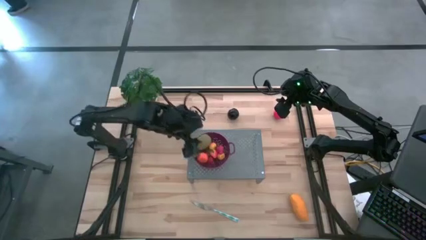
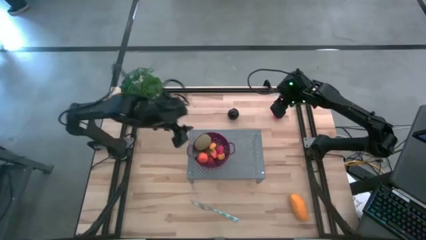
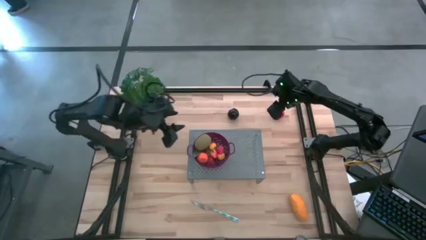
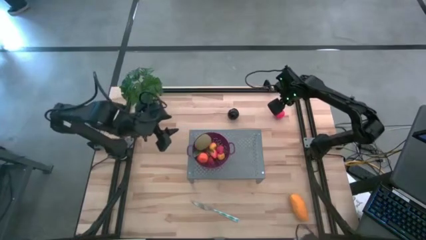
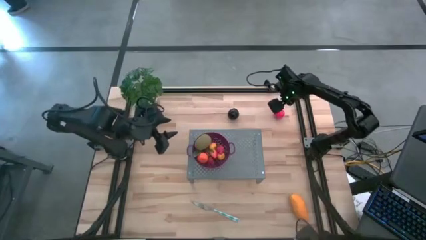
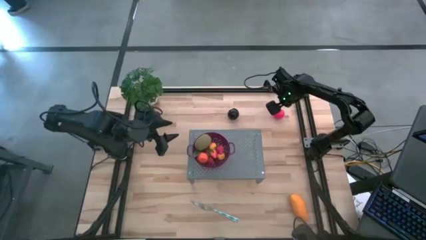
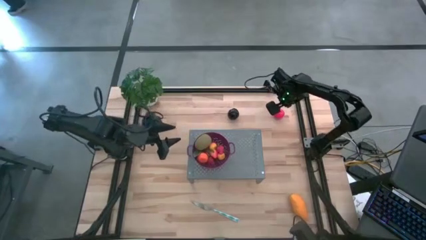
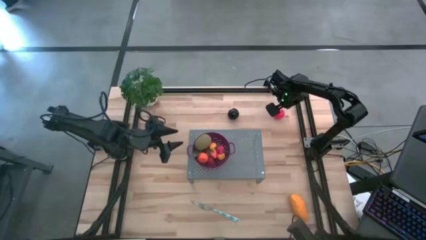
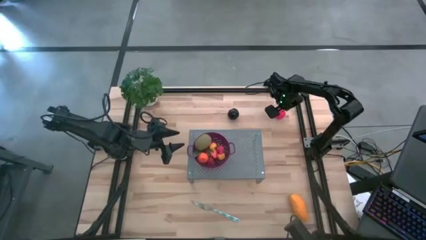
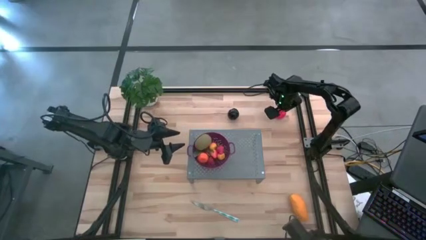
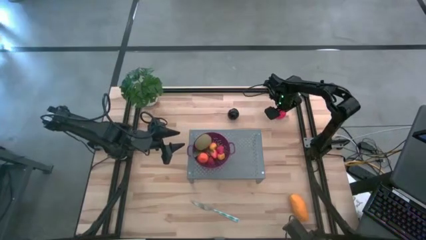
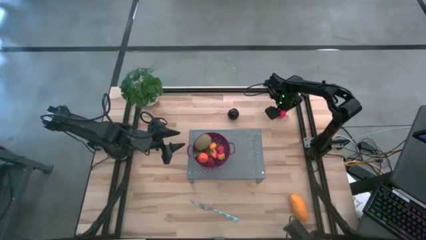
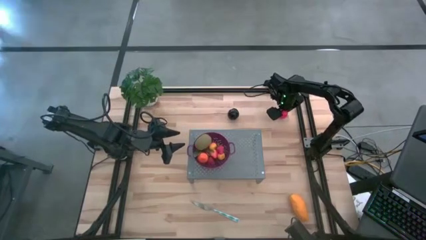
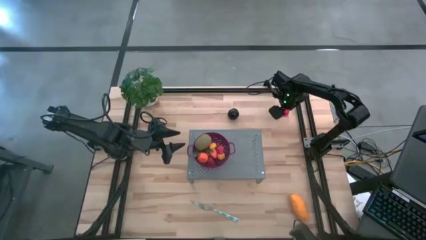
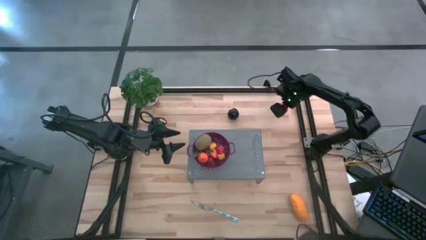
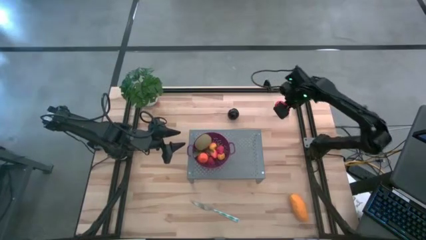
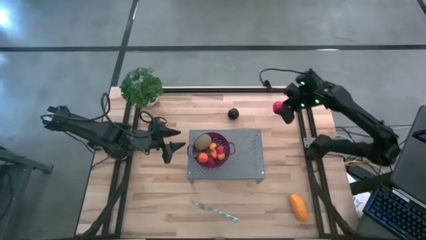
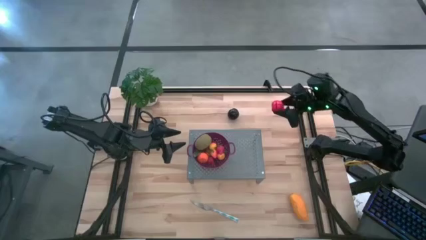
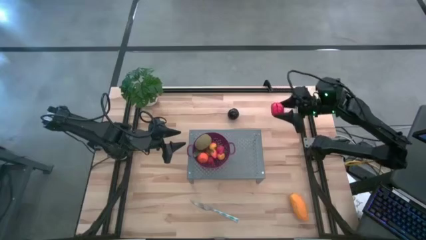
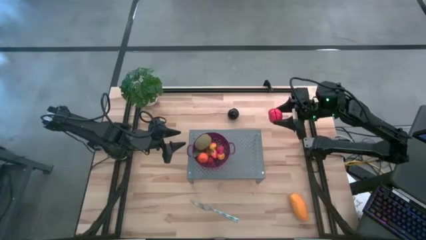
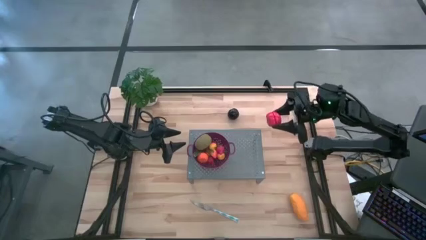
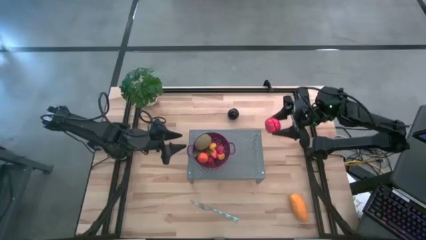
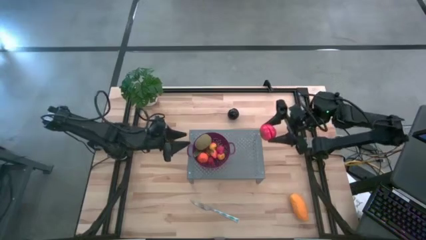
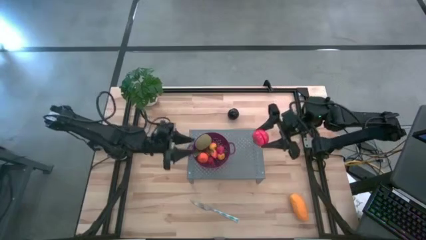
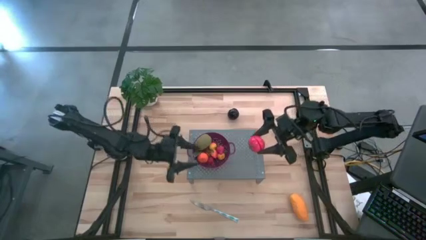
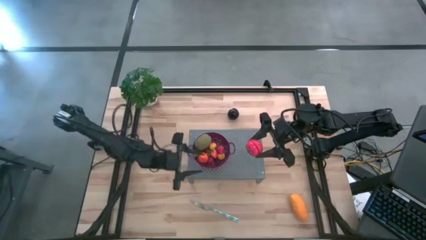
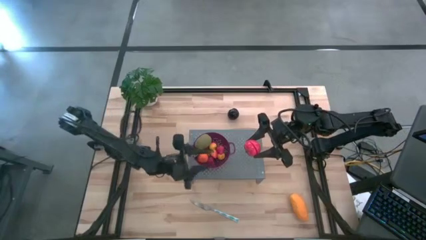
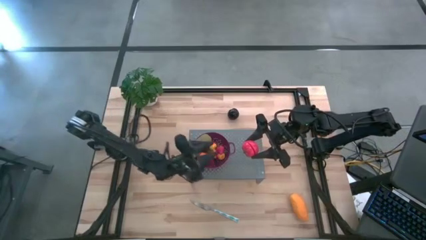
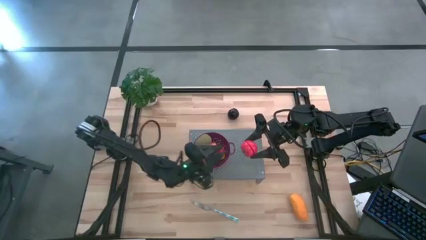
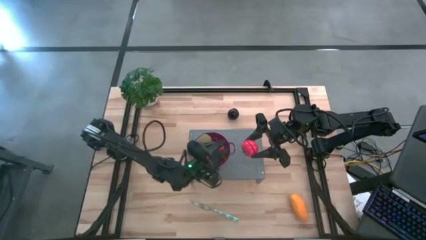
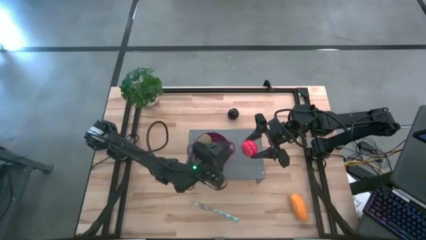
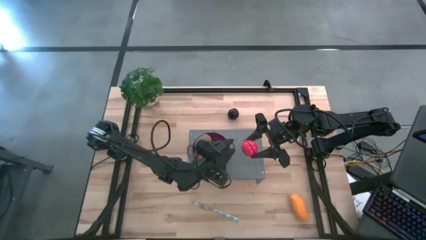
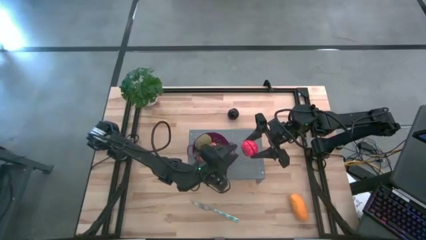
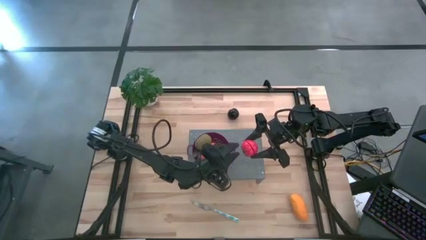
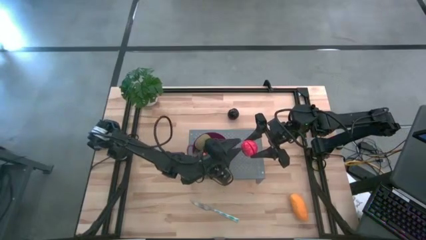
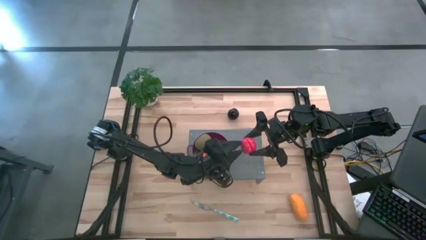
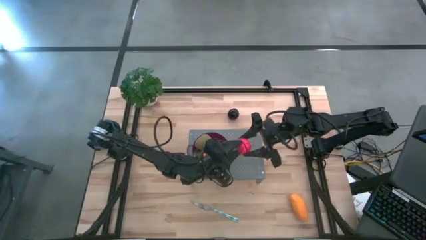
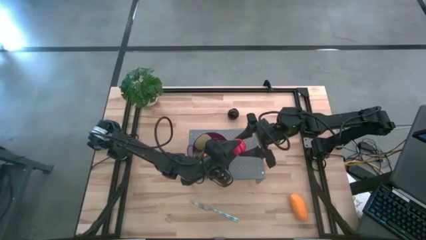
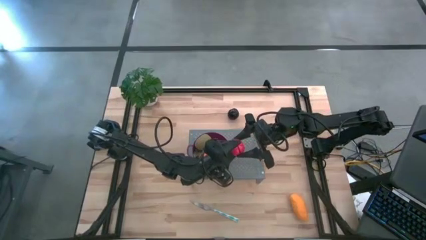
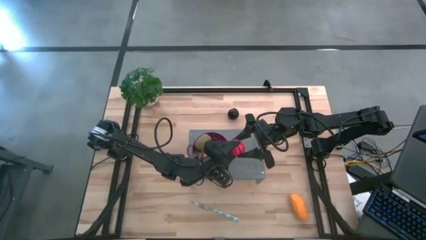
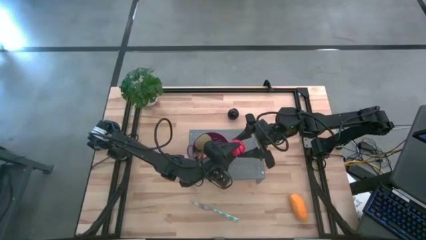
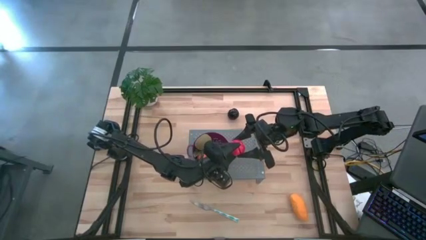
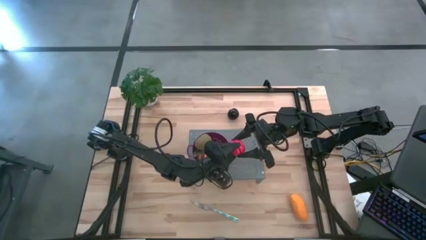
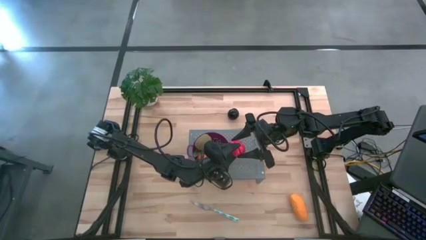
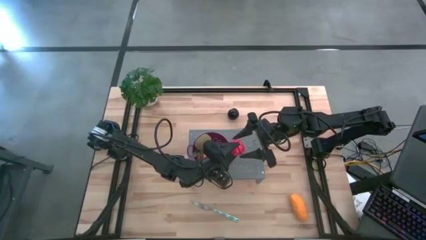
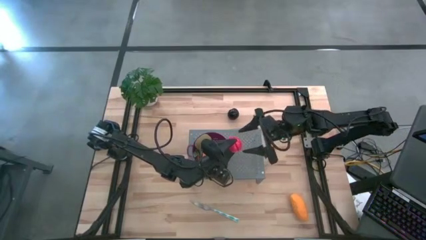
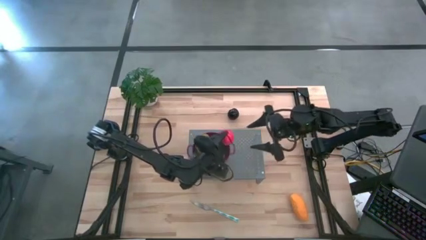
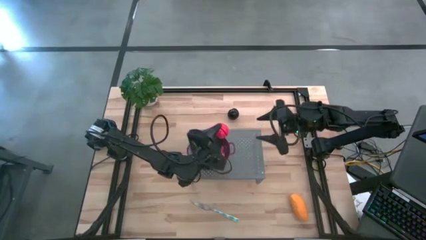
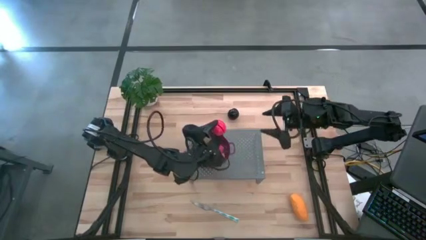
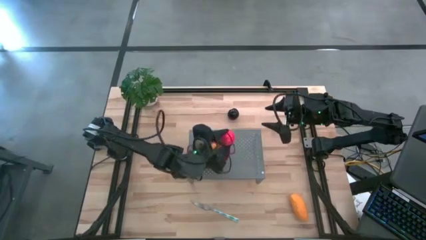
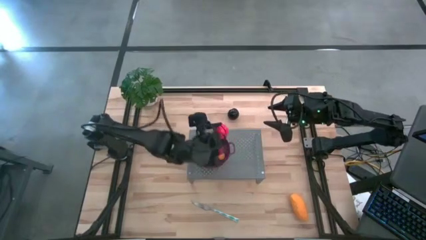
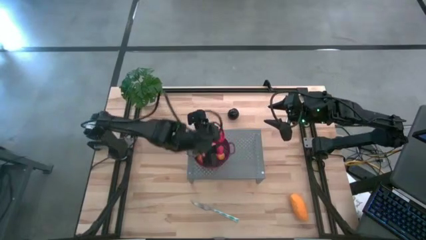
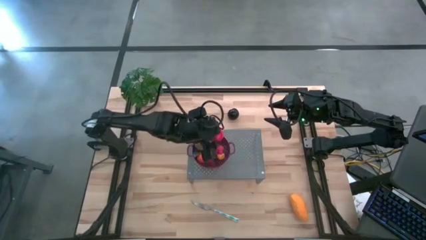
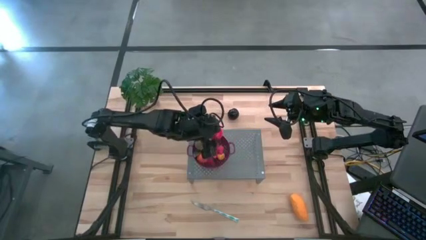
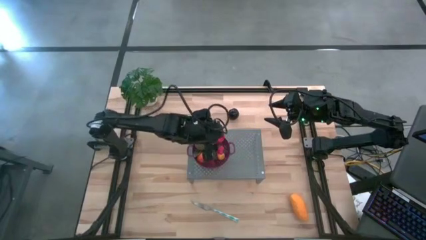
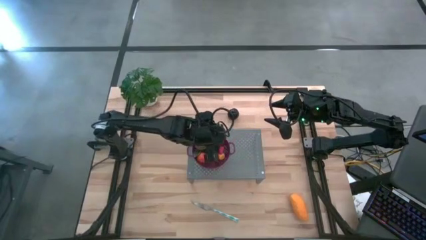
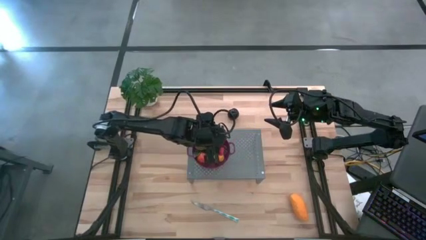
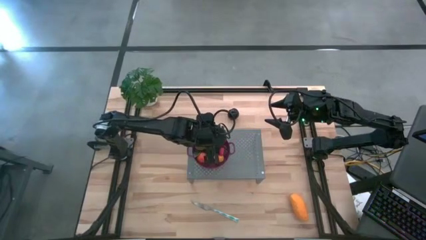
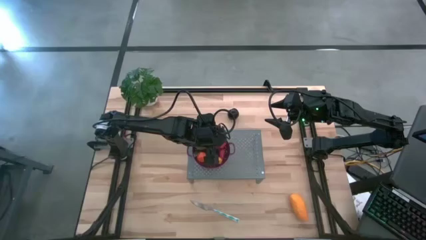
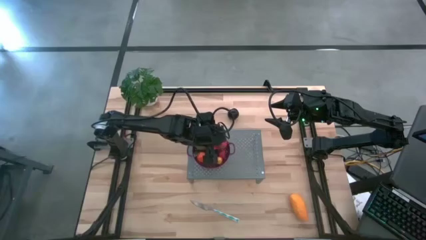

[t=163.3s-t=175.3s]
Task: Pick & Place Fruit
Put the tomato into the purple strainer bowl

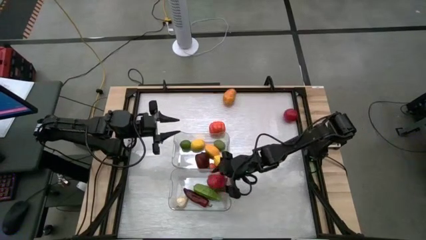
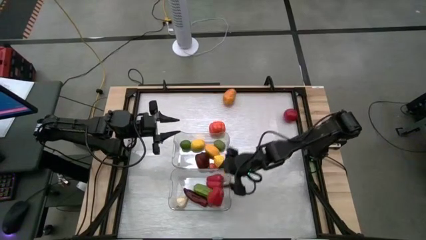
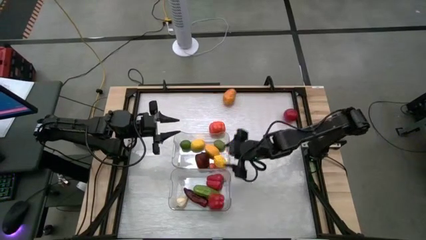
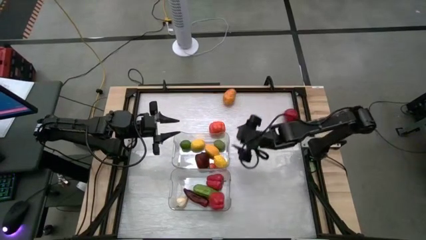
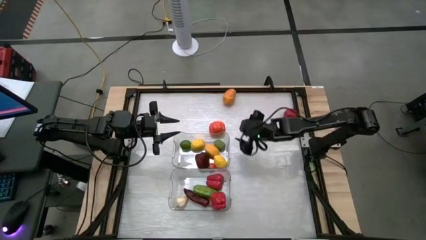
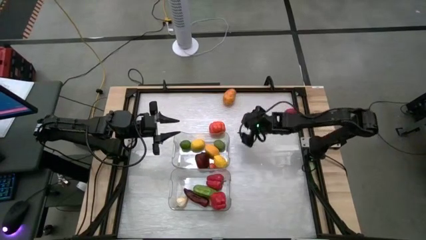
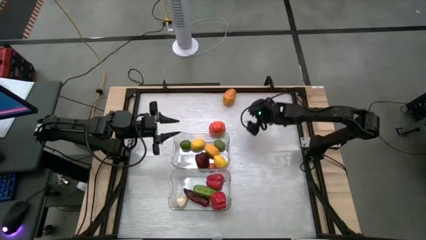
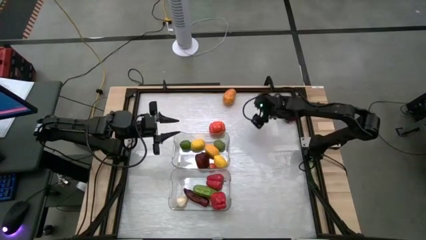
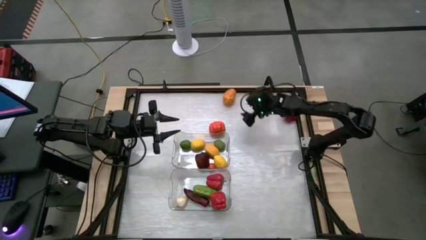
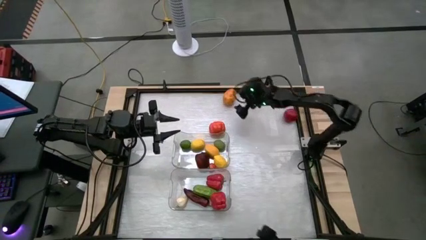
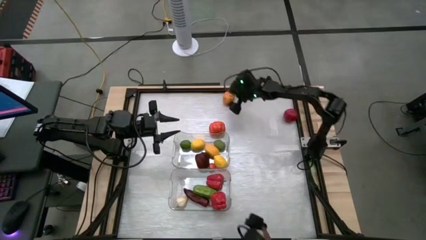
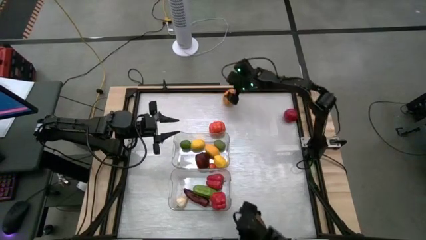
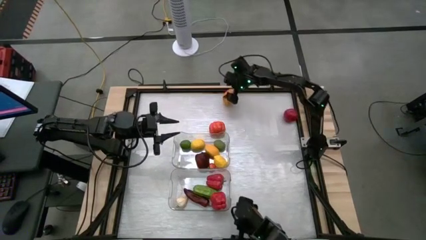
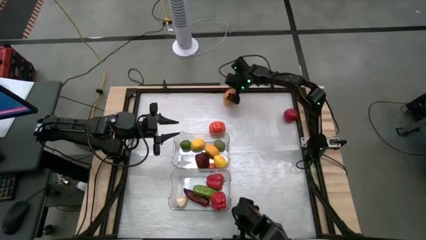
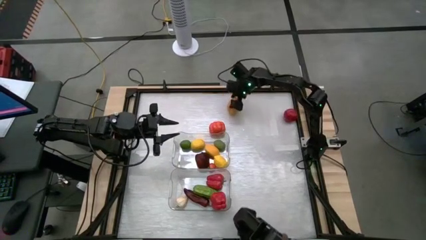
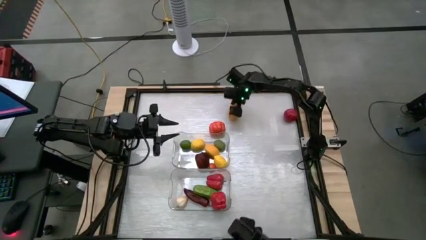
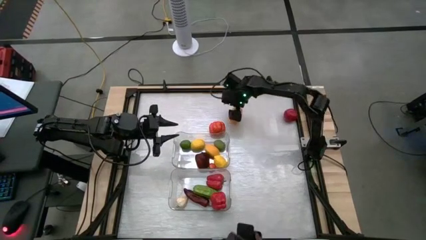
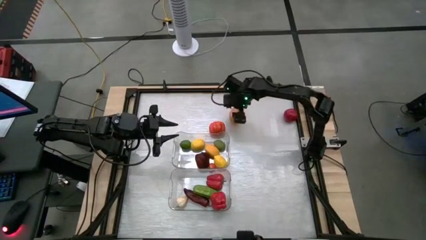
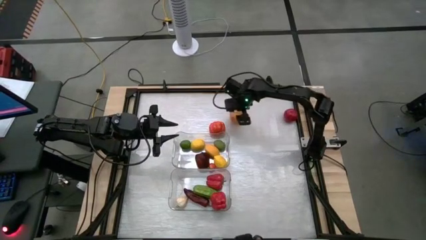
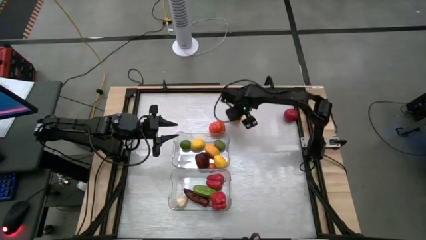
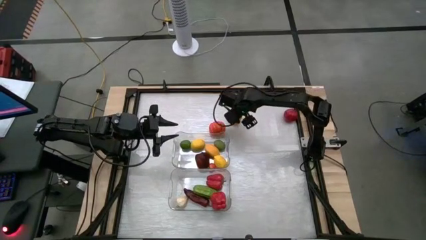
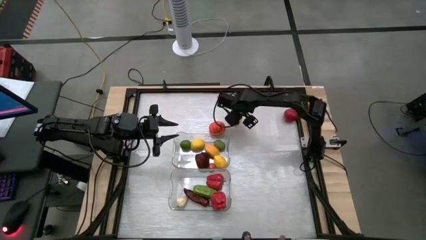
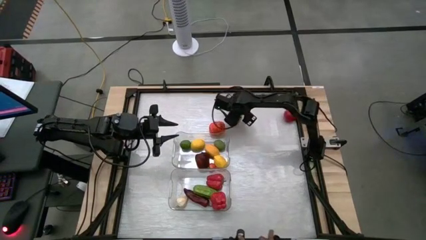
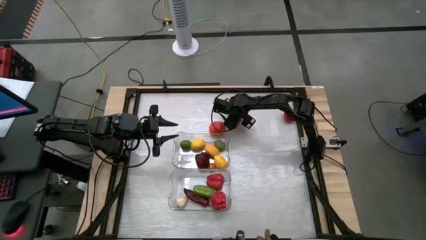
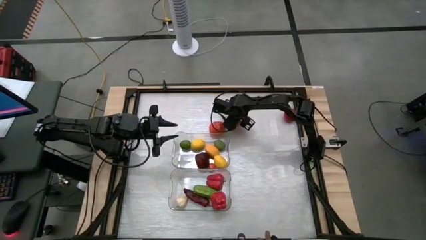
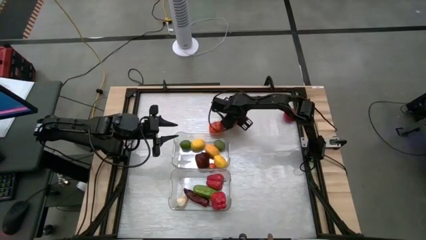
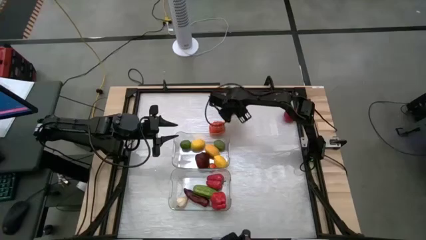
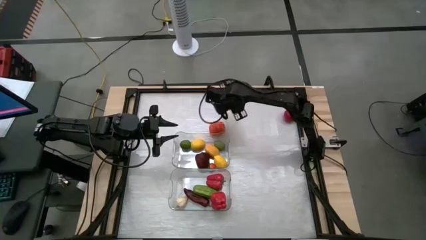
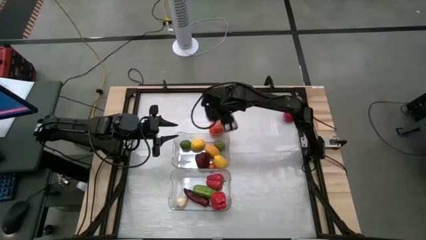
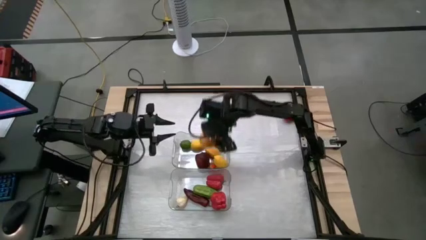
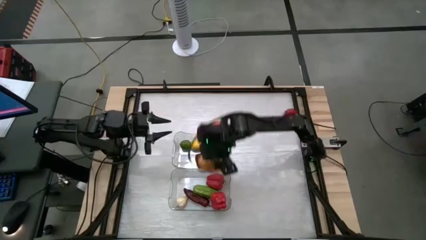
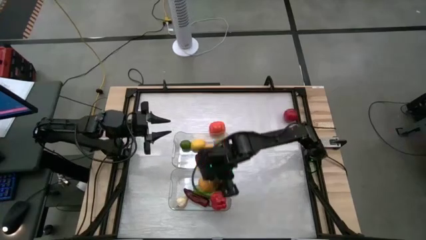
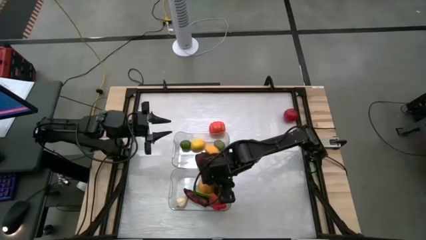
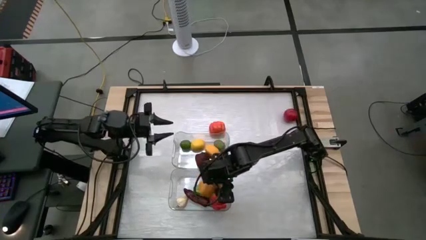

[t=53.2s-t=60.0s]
Task: Sort produce into baskets
Put the potato into the bottom transparent bin
